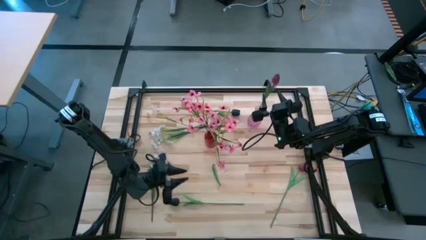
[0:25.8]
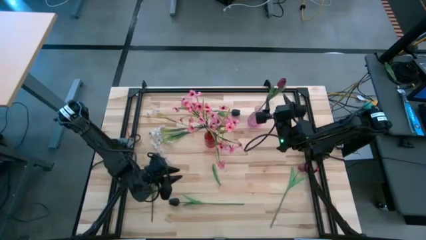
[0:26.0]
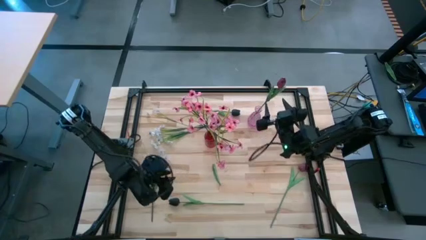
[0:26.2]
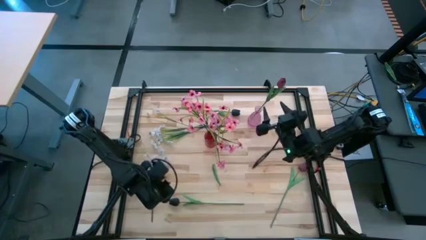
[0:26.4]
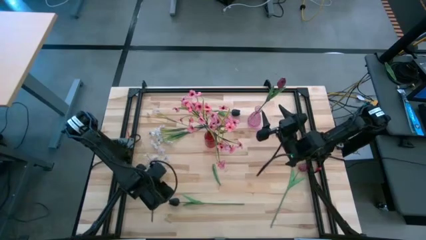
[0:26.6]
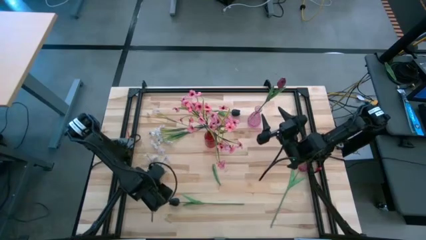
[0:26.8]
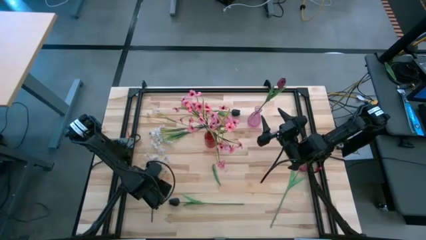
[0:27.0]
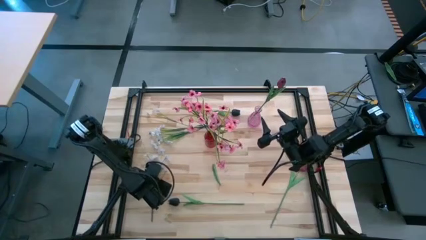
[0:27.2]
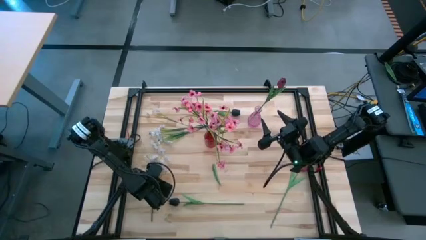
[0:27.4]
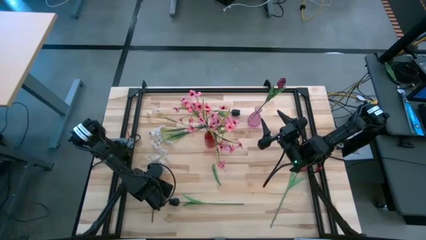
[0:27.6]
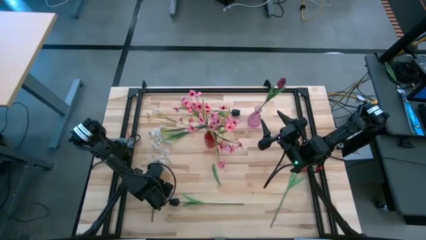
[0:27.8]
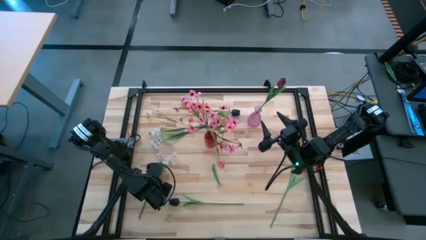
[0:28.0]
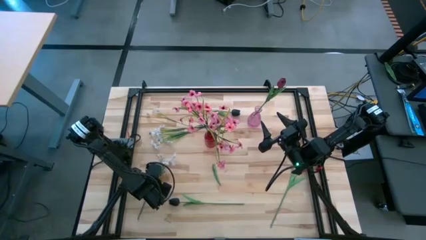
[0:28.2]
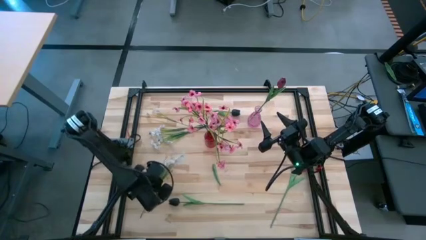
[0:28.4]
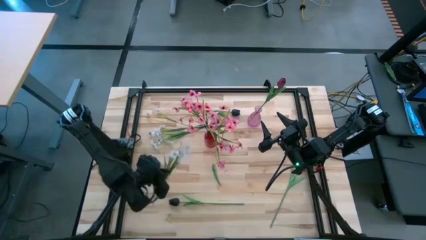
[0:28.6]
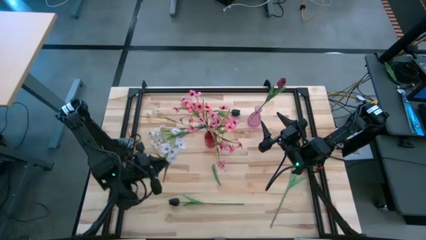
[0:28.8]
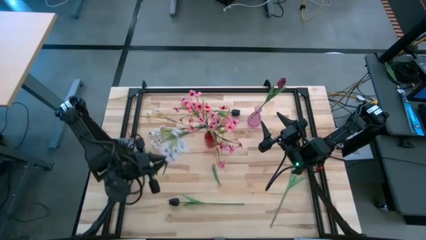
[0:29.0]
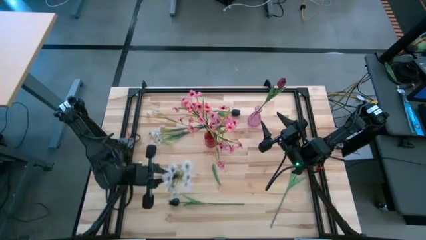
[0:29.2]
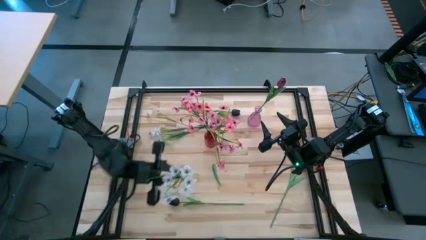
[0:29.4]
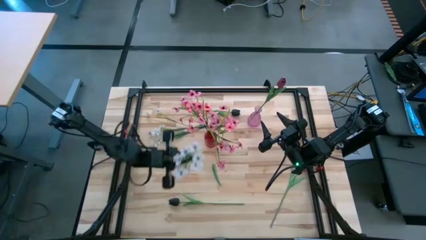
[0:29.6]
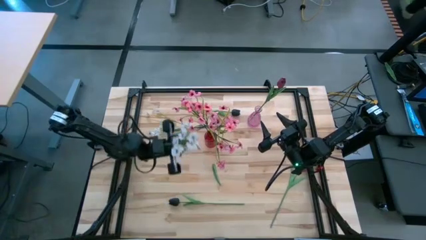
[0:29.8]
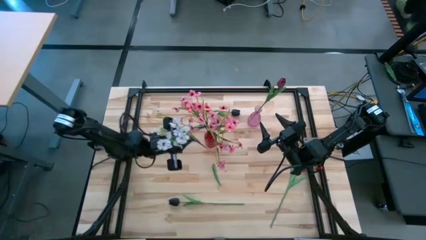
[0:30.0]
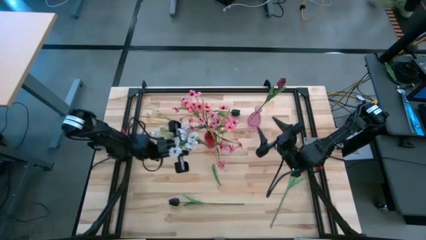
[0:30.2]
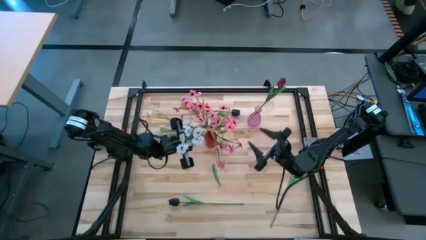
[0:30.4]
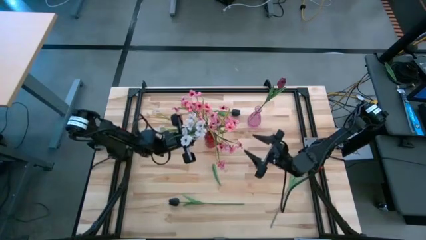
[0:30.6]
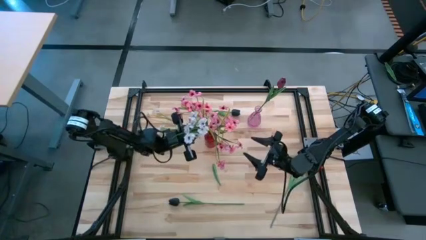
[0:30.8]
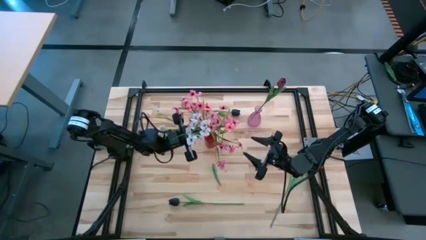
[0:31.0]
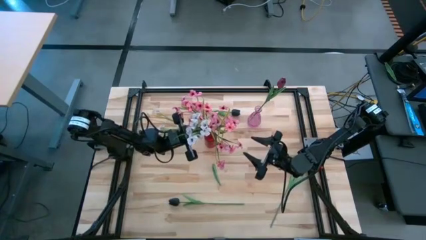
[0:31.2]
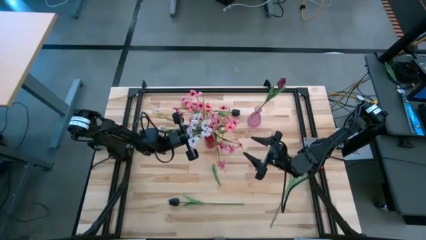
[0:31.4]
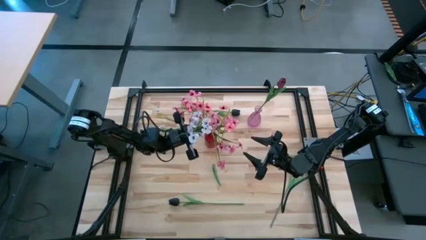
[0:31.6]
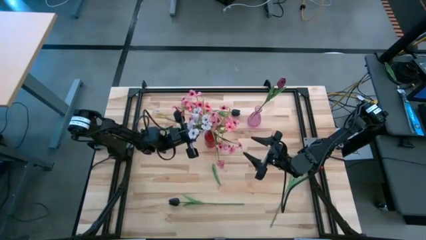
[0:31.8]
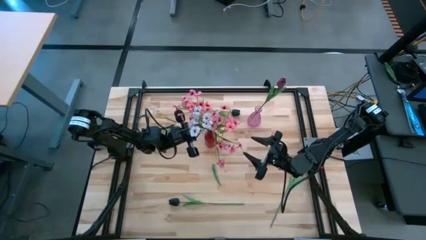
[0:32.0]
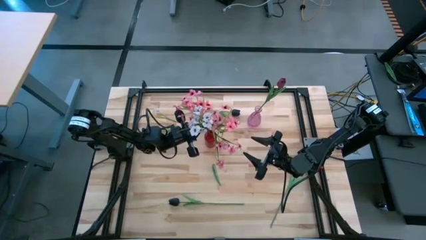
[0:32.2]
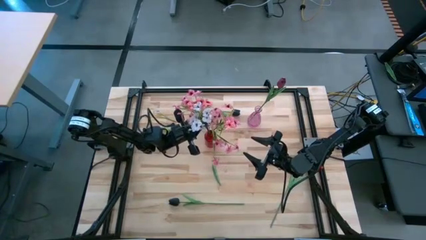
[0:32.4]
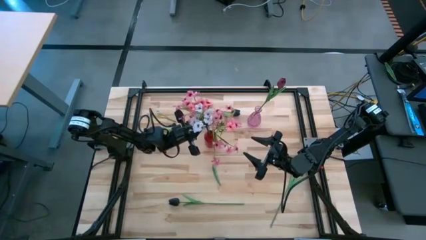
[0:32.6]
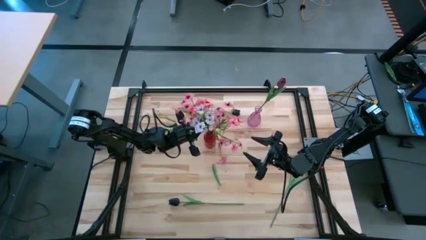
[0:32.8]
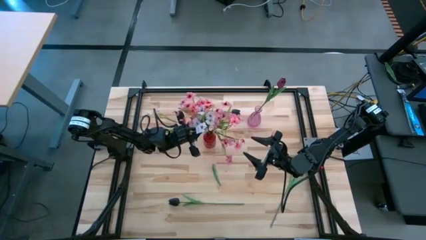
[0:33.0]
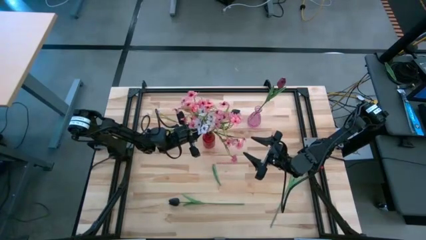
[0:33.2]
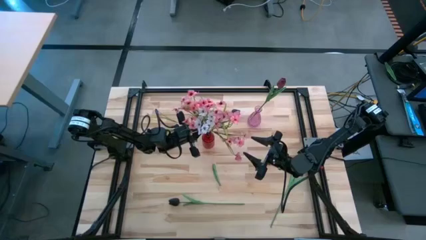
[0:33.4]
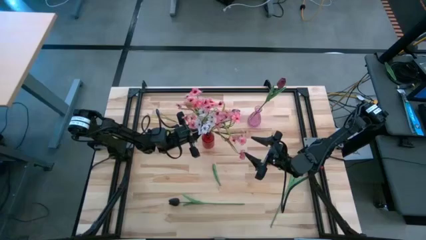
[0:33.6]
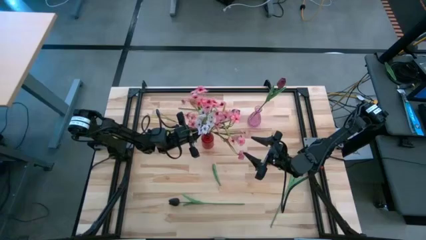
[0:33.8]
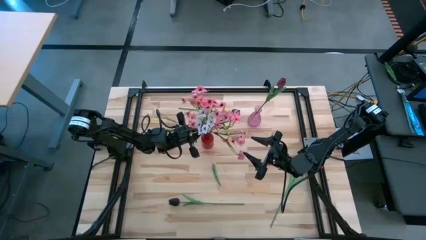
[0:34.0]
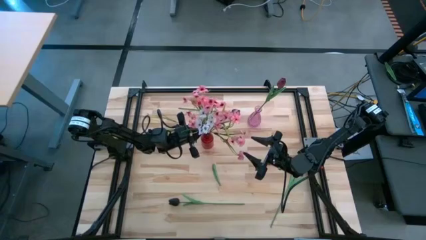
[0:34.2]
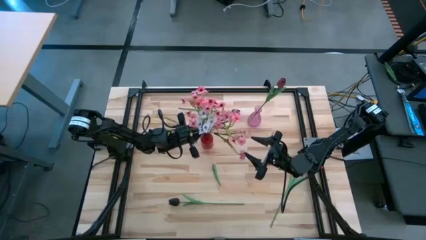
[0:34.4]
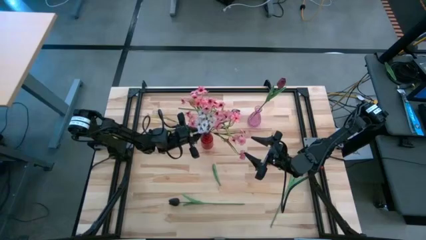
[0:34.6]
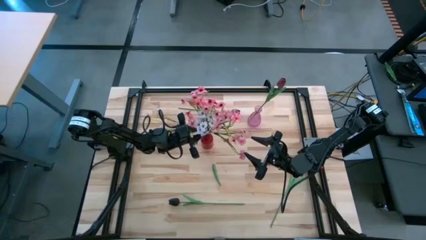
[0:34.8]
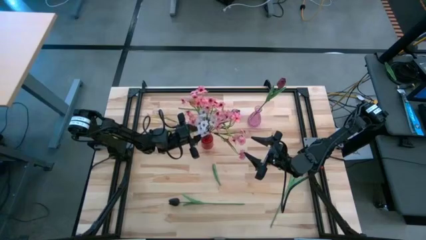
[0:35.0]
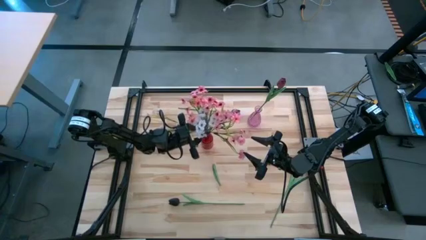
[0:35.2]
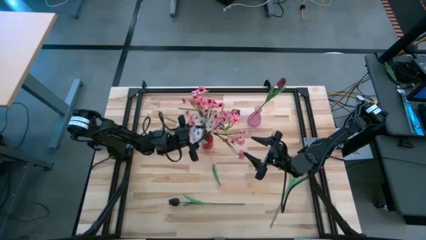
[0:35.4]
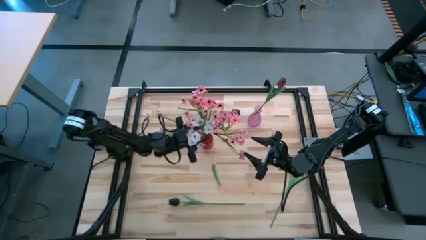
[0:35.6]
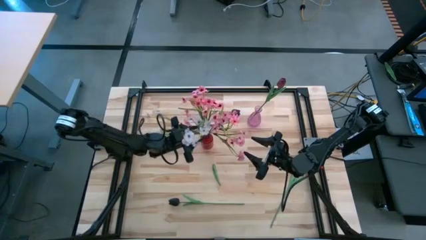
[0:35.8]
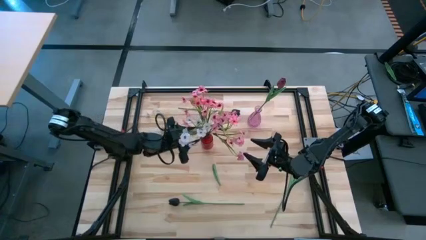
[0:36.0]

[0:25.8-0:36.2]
Task: Sort flowers into vase by color
Put the bottom white flowers into the red vase

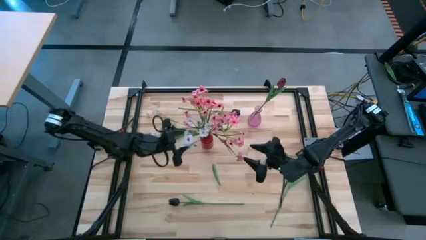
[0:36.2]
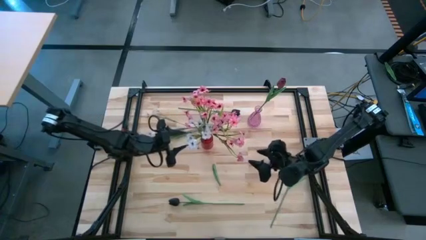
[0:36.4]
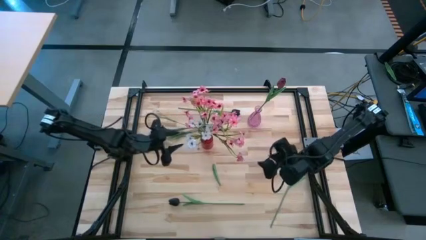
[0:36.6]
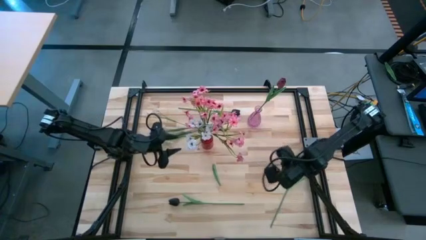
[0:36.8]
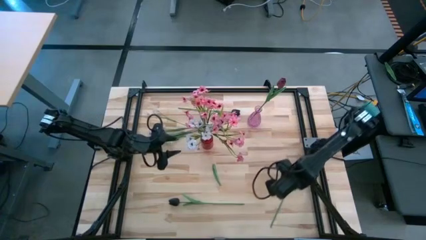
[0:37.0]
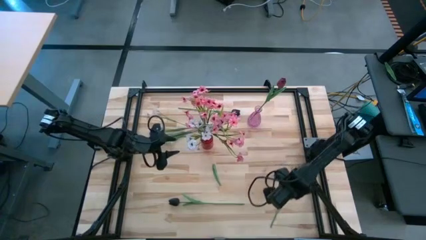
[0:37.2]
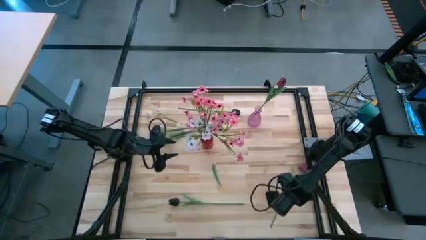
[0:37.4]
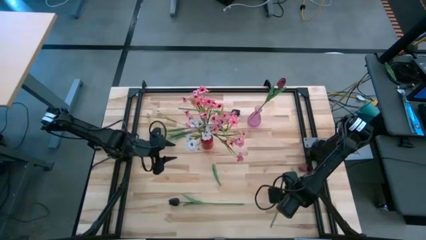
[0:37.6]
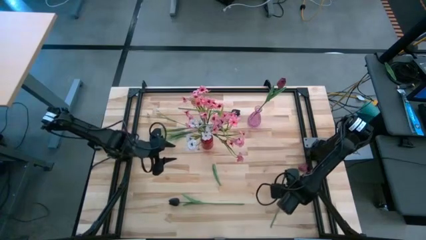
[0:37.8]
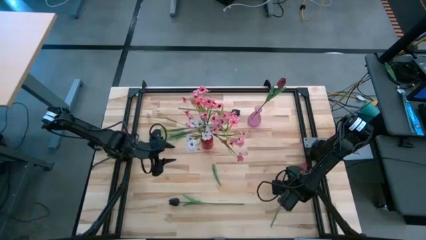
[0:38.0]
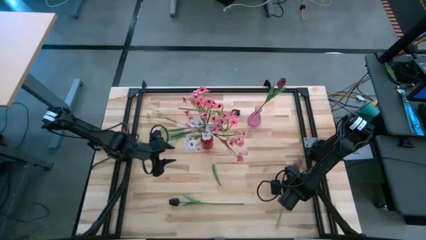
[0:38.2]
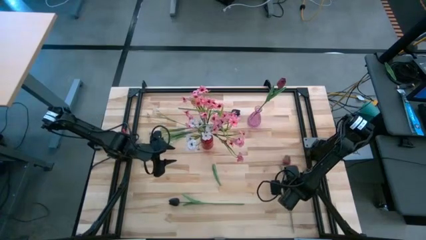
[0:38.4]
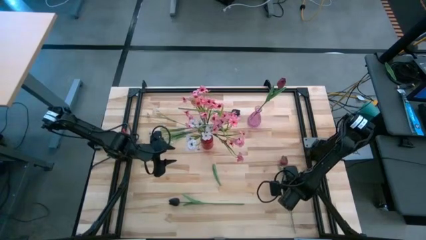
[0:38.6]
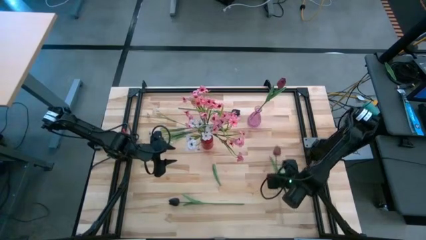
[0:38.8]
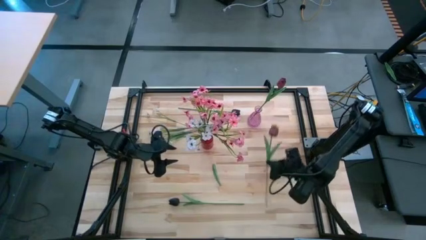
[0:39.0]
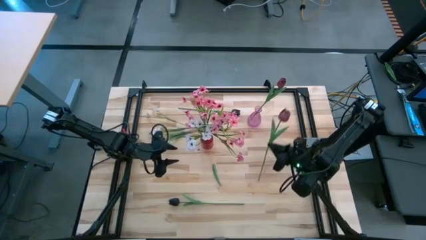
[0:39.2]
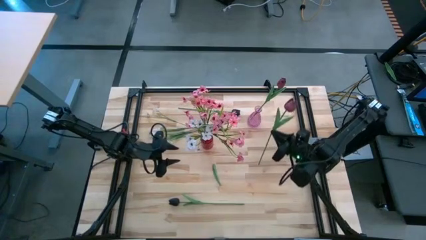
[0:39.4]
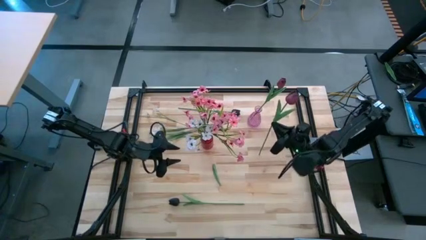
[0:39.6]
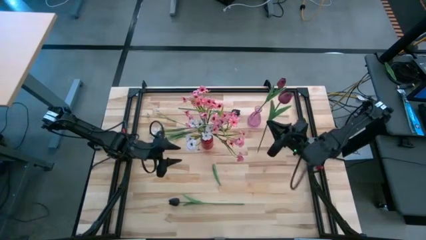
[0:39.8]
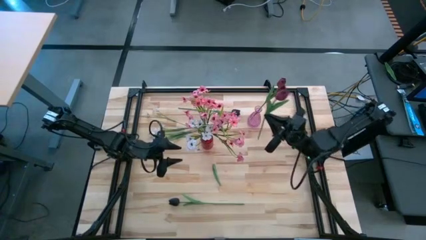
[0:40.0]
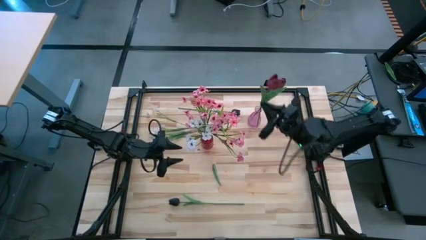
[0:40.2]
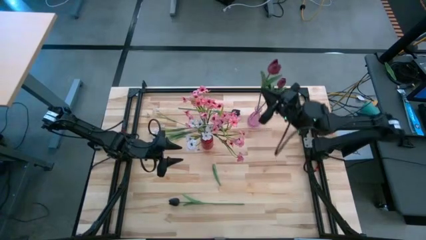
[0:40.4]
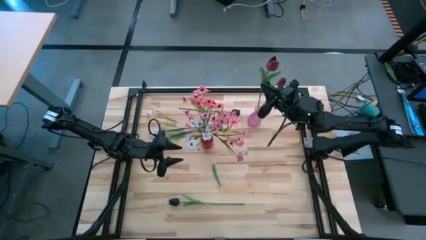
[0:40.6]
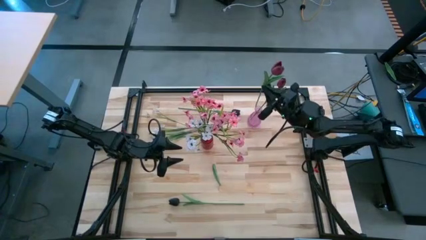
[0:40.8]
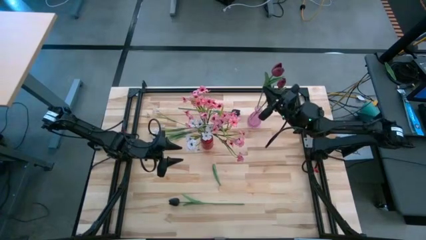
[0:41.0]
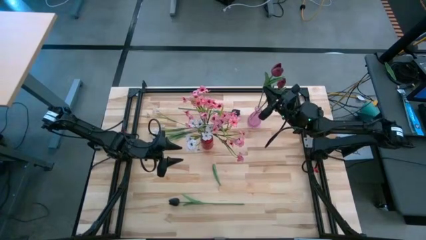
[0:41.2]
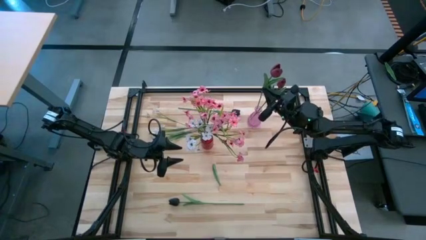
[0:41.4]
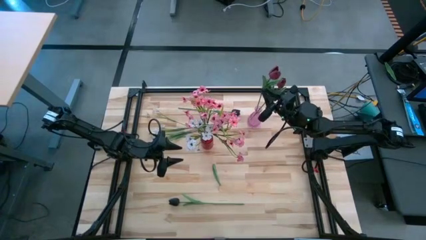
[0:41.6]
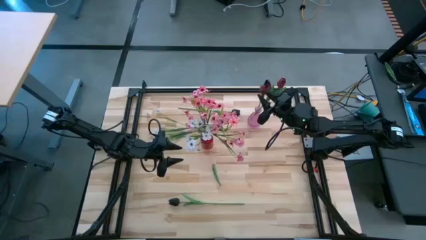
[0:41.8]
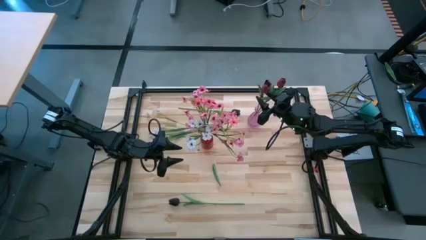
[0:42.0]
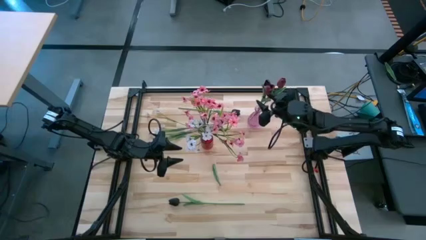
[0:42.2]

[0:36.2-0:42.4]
Put the red tulip into the violet vase

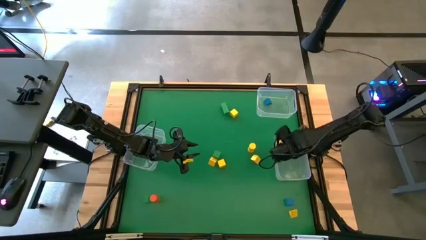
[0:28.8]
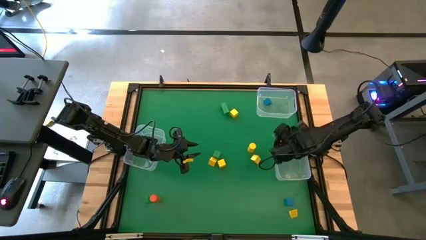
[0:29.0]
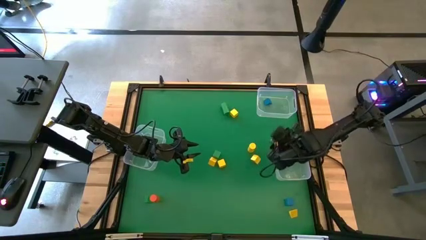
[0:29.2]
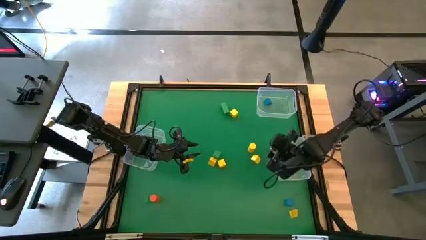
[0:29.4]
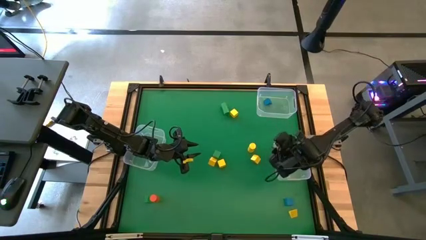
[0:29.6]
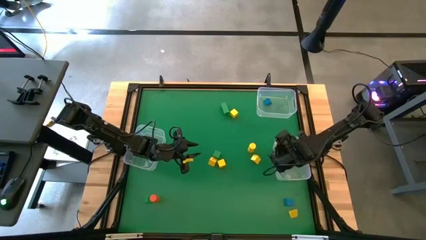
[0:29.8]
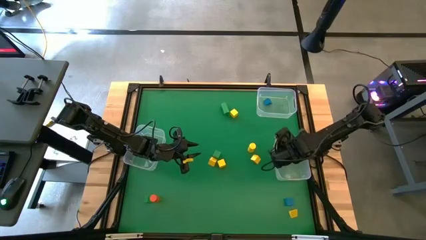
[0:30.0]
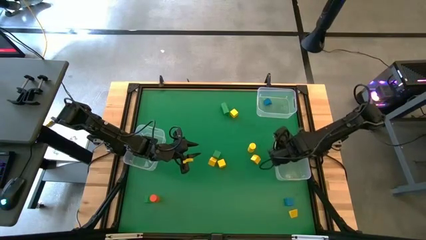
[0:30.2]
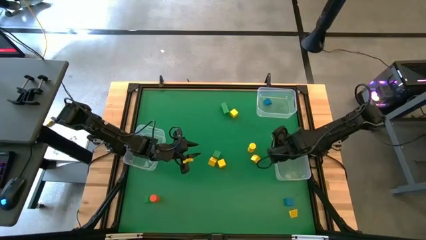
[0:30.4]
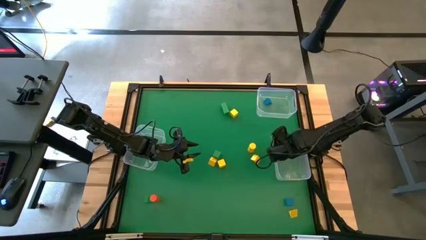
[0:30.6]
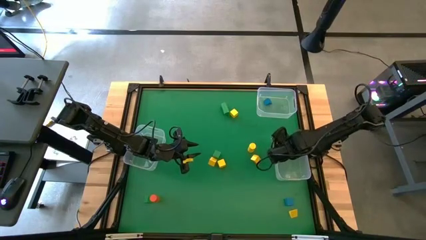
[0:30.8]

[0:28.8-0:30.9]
Task: Sort blocks by size
Adjust the yellow cylindrical block in the bottom left transparent bin
